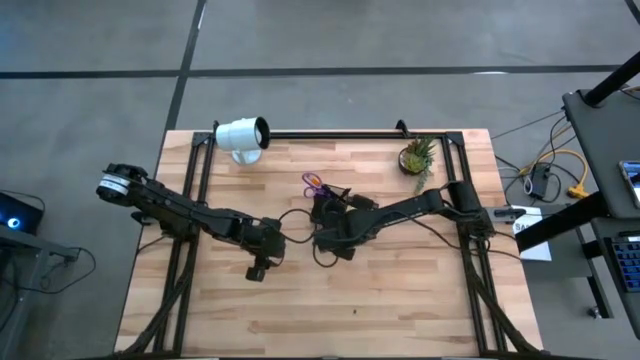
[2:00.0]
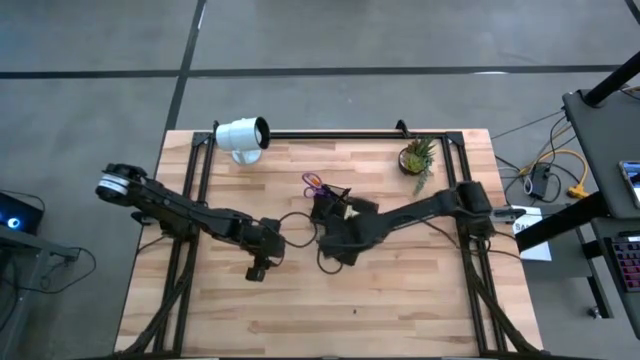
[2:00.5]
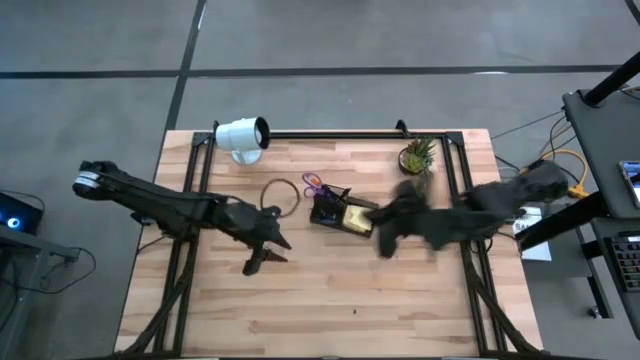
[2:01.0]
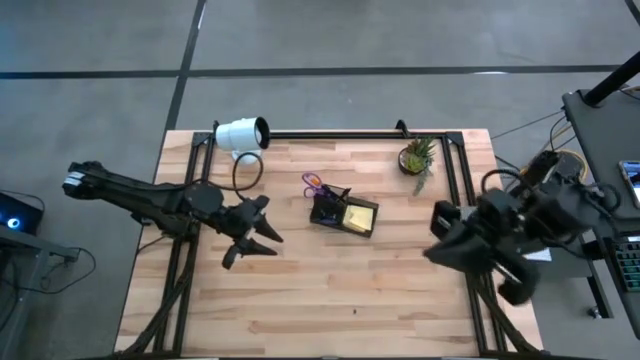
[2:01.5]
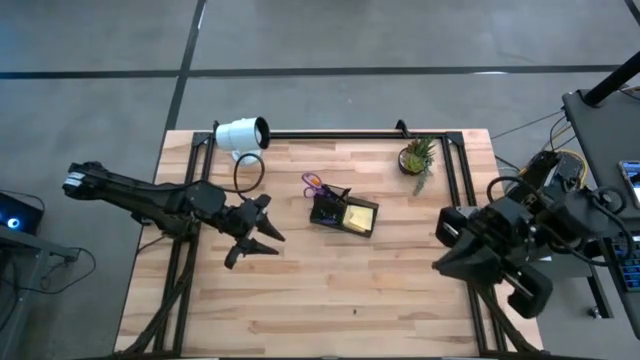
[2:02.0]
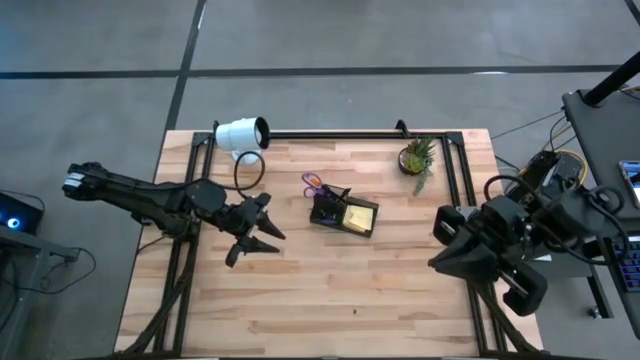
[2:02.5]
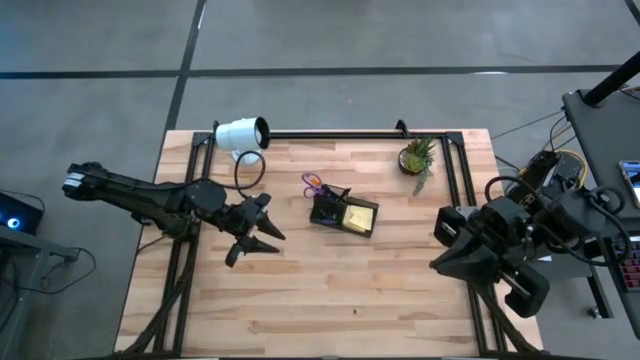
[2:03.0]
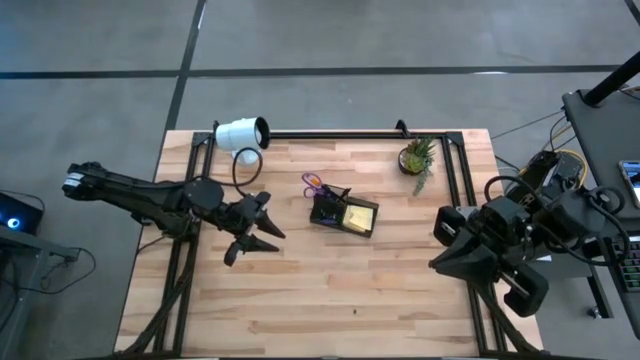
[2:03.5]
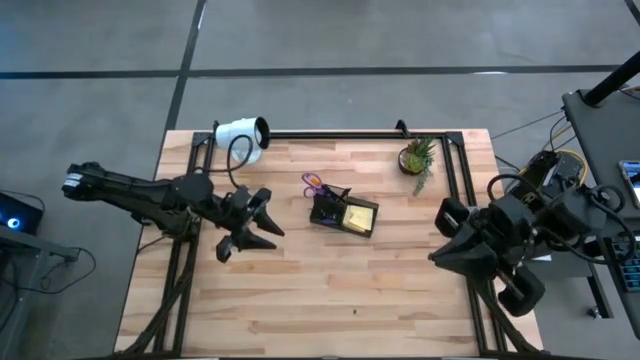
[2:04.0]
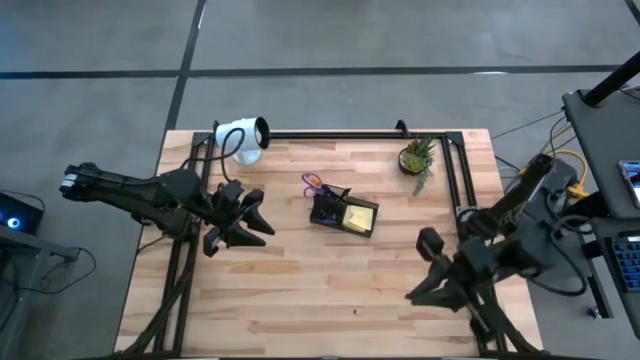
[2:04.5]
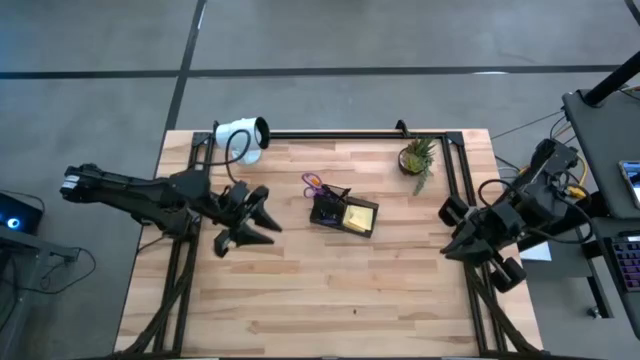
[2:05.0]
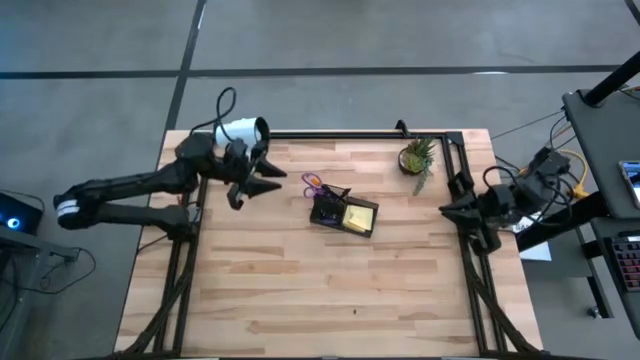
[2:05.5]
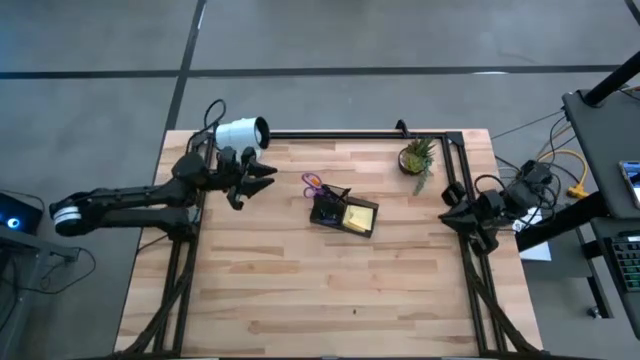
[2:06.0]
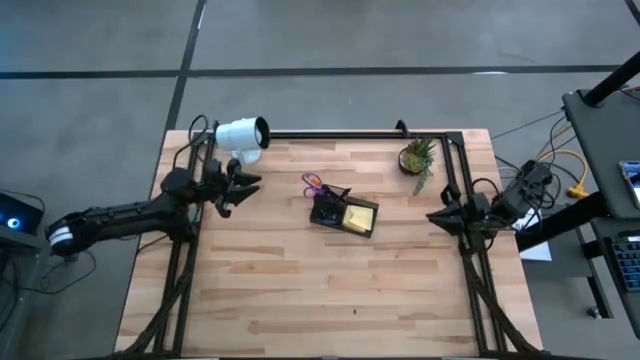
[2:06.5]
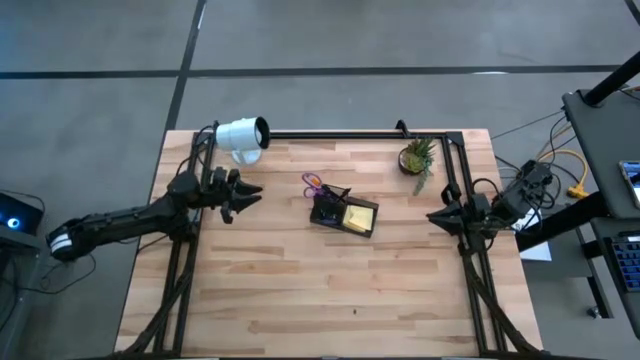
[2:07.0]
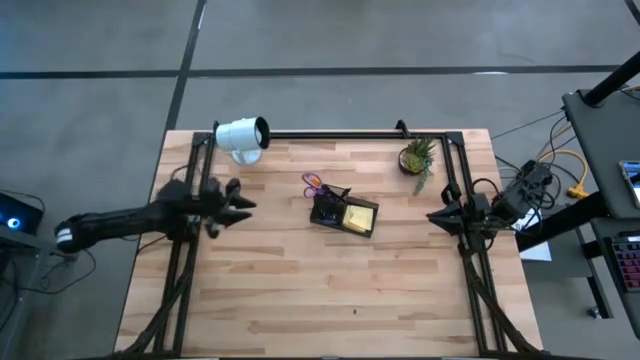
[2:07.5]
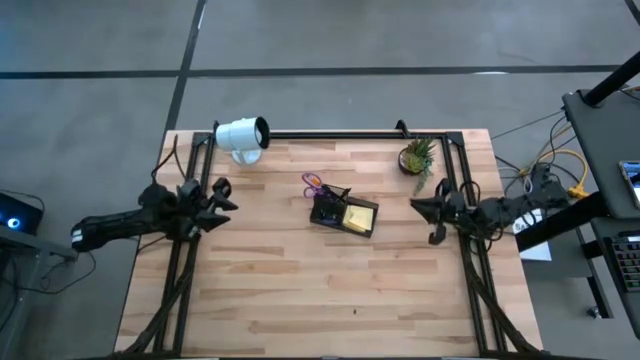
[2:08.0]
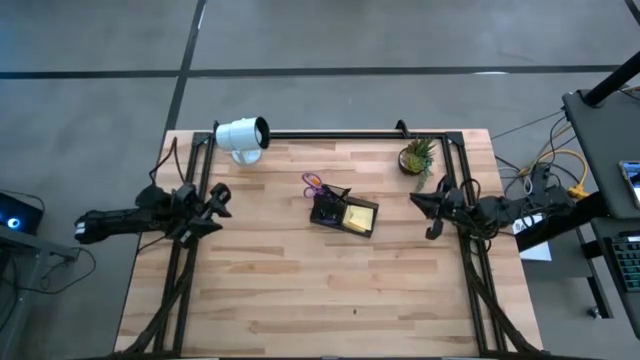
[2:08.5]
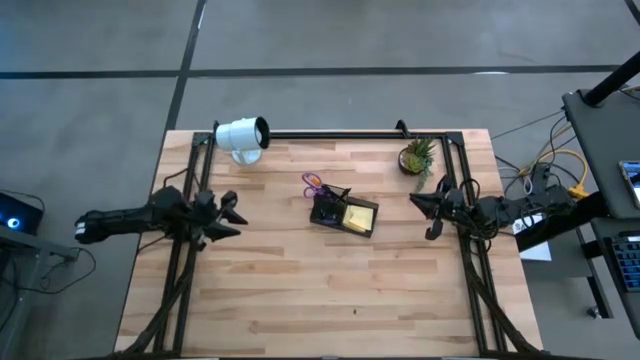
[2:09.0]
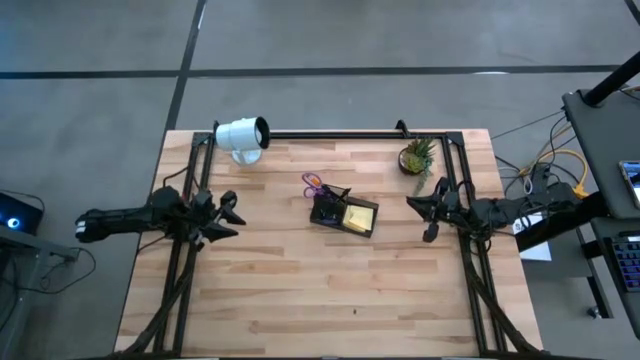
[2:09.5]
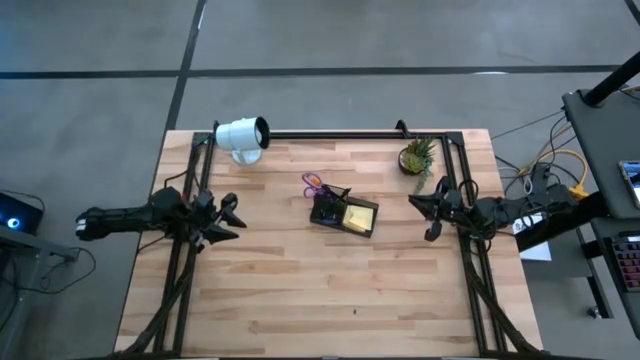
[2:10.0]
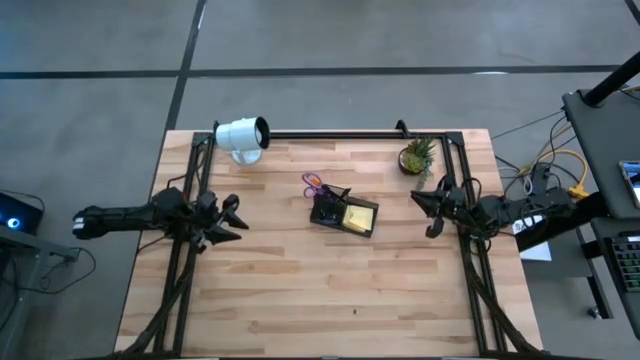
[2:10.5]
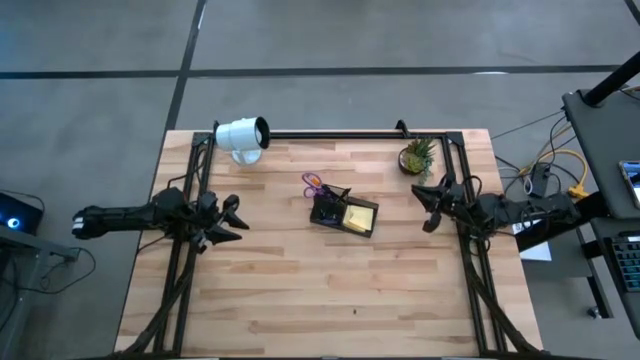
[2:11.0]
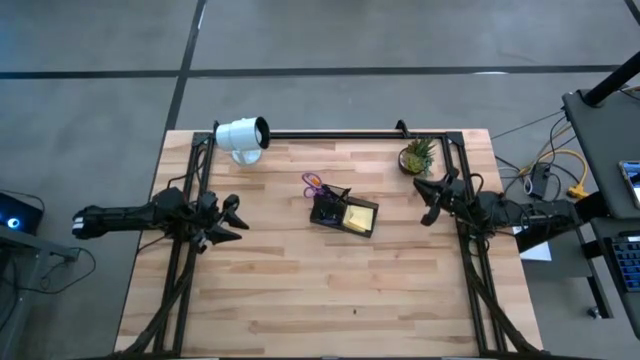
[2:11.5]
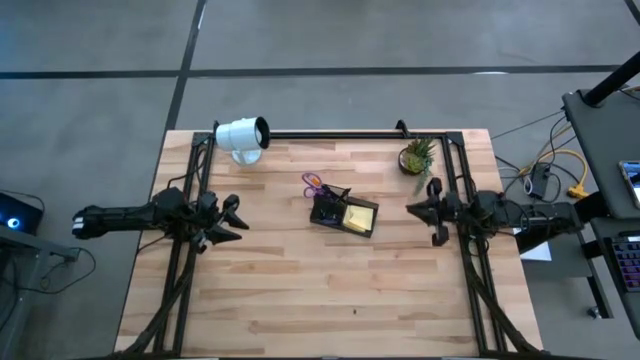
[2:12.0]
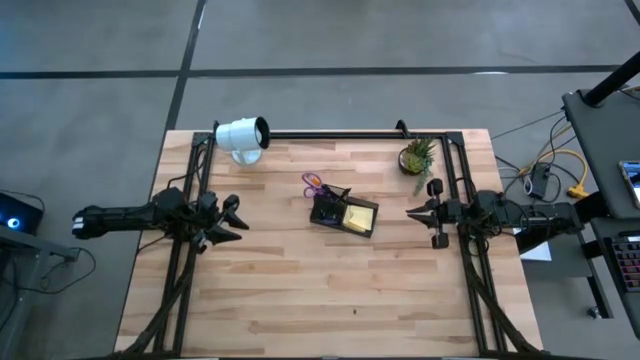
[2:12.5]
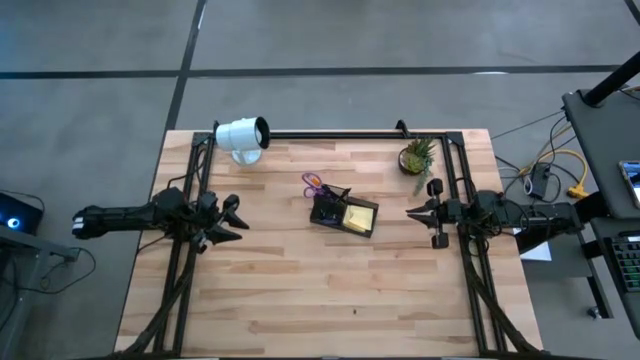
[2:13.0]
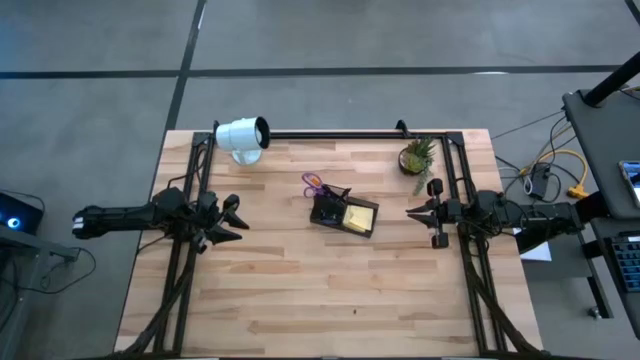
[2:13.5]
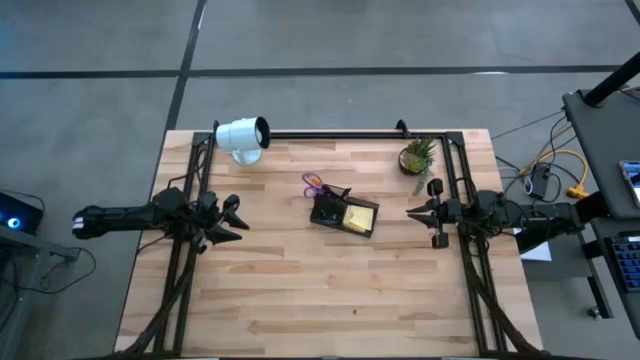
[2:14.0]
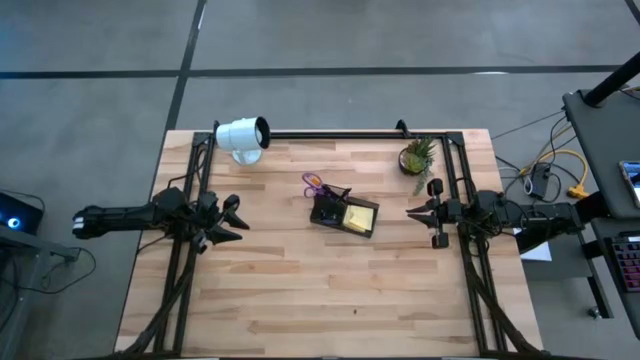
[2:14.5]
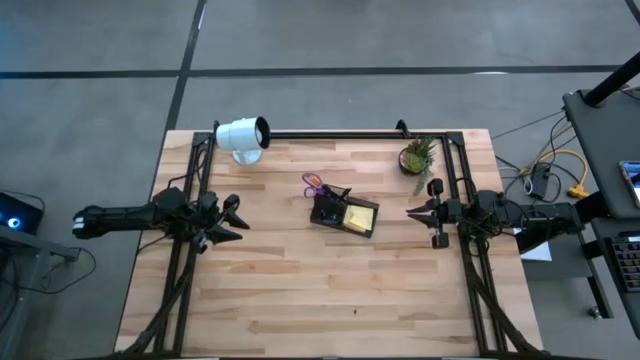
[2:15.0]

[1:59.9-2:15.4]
Task: Pick and place office supplies into organizer
Return to Home Position

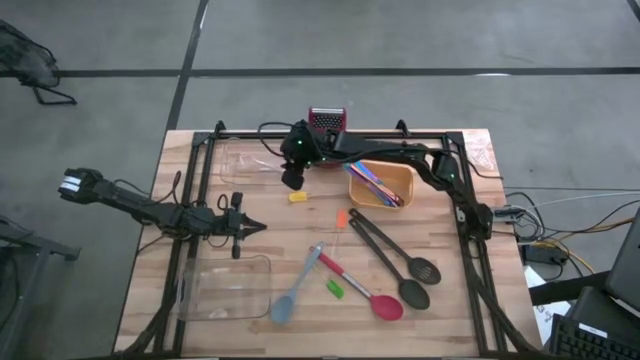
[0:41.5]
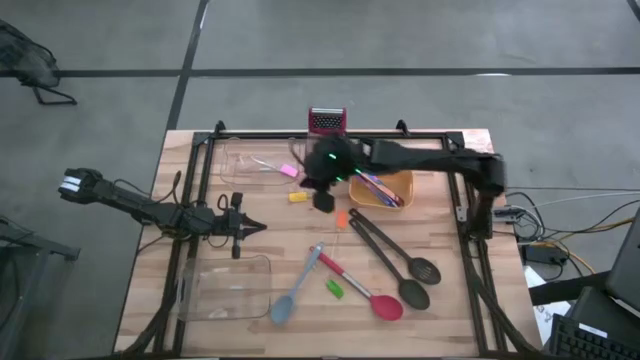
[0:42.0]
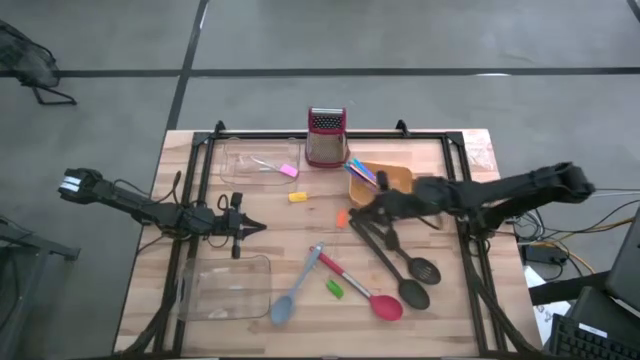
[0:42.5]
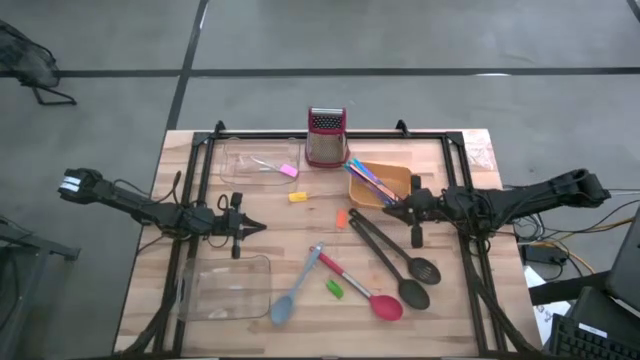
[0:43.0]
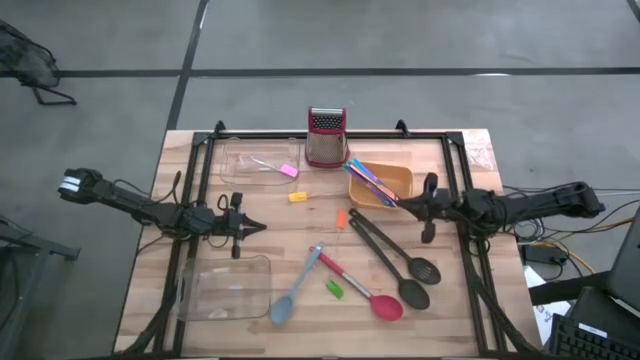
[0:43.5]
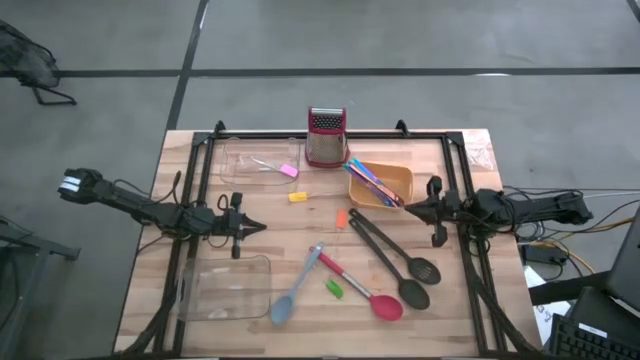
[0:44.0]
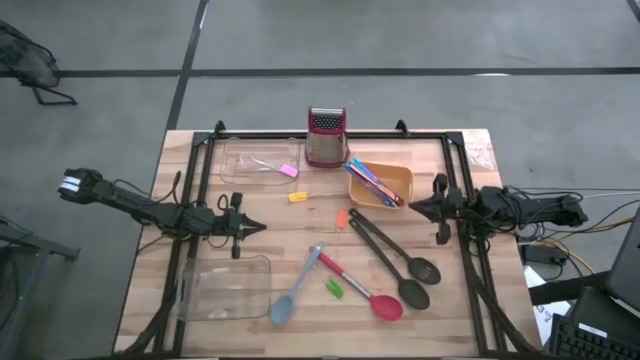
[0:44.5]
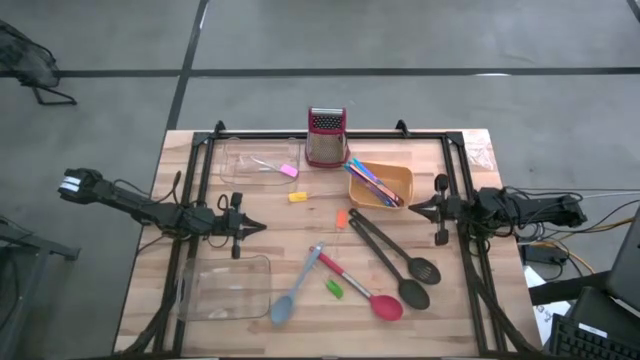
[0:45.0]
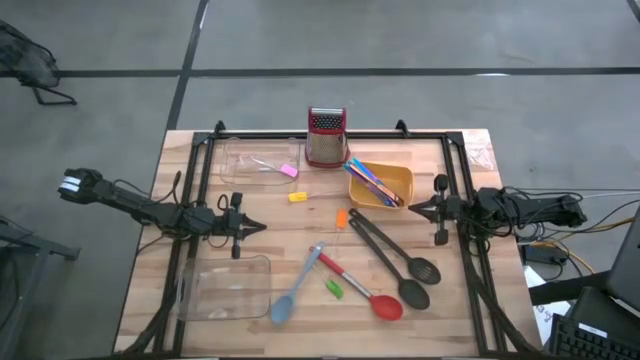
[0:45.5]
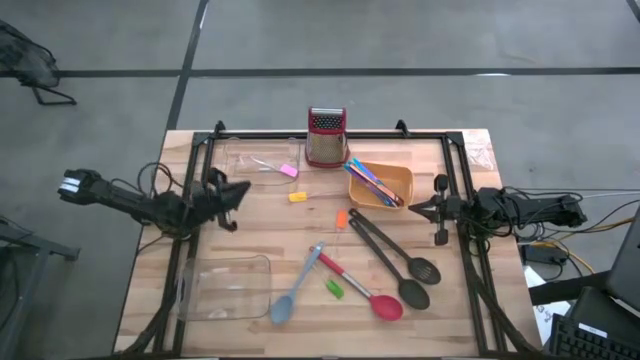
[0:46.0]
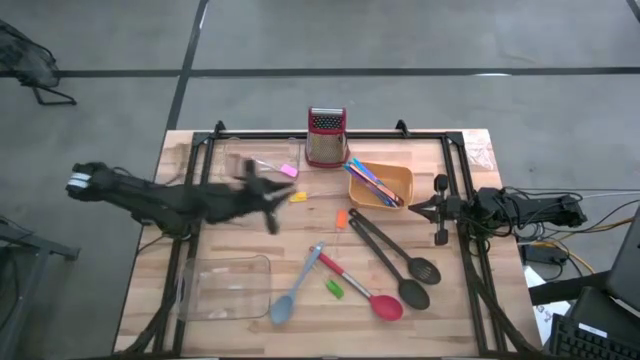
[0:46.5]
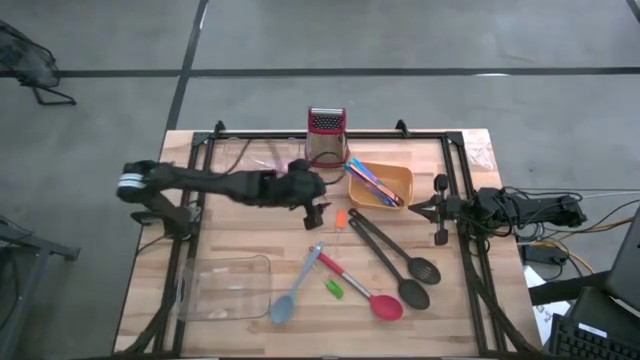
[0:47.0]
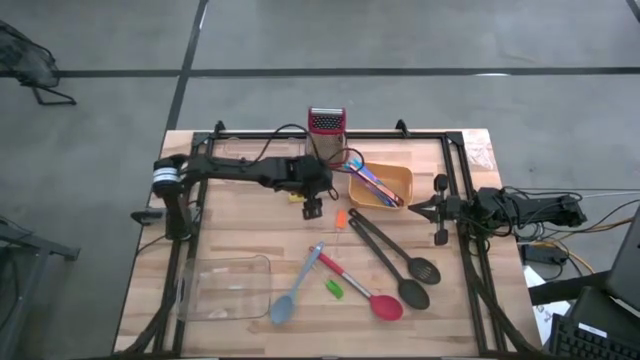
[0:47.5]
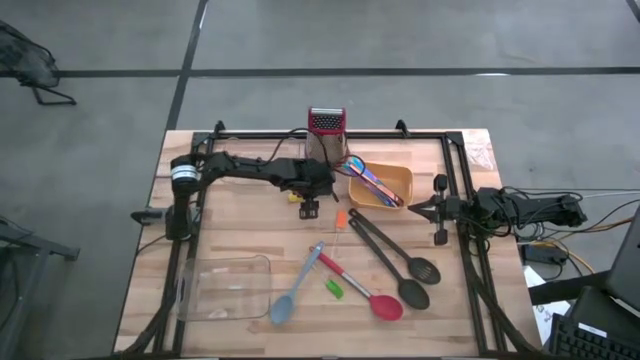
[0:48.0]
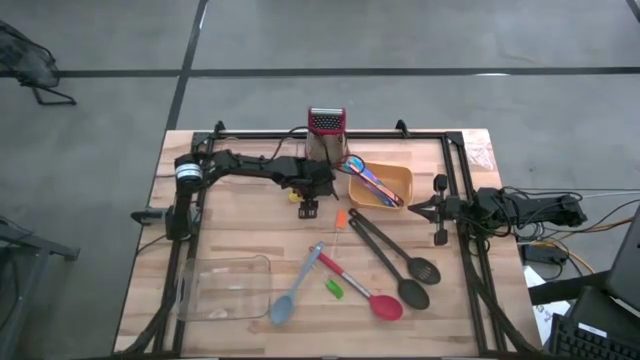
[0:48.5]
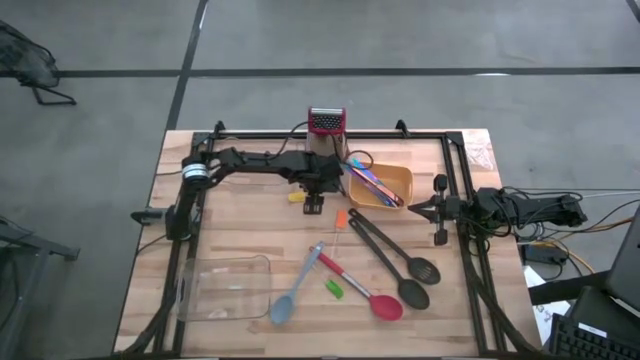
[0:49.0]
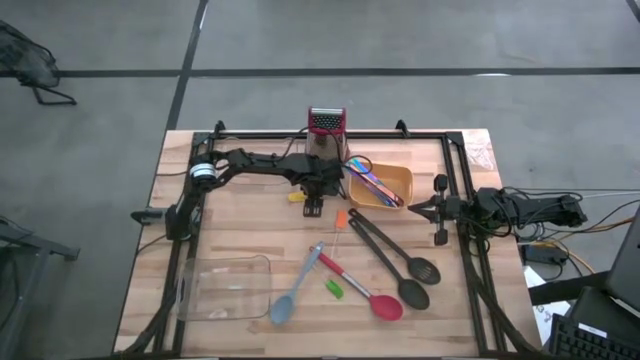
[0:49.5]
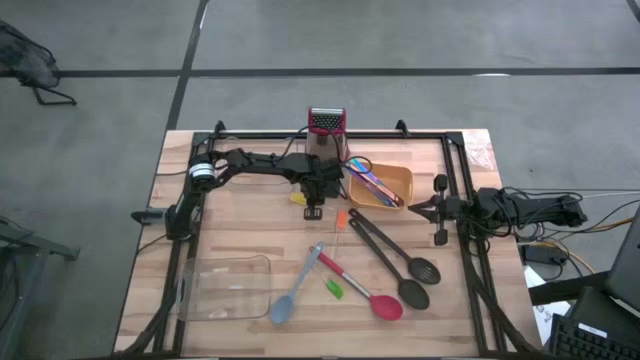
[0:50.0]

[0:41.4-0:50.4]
Task: Pick & Place Kitchen Items
Put the yellow spatula into the top transparent bin
